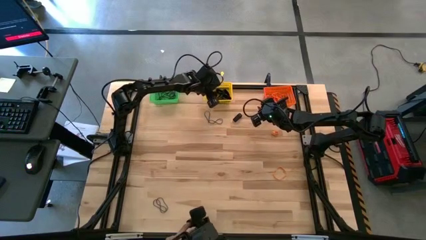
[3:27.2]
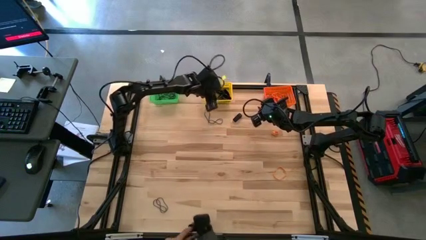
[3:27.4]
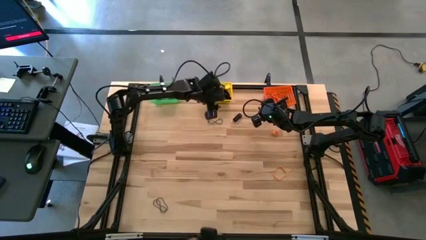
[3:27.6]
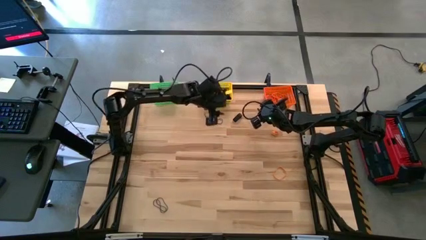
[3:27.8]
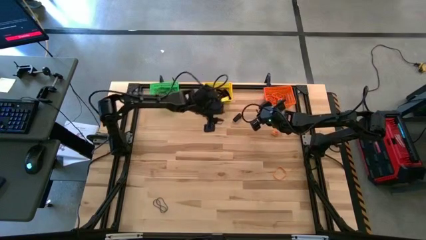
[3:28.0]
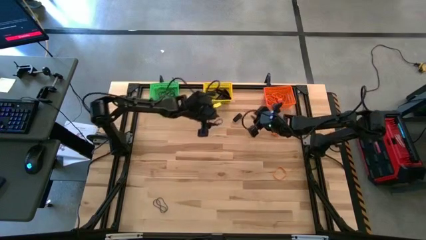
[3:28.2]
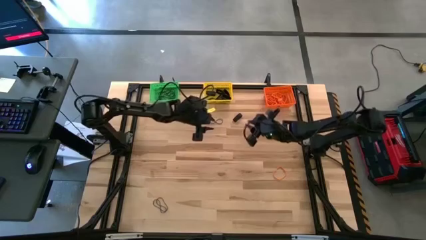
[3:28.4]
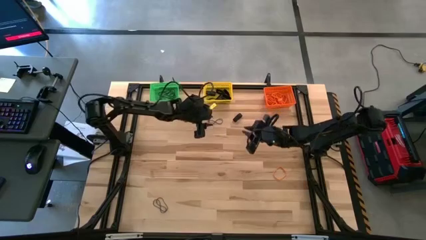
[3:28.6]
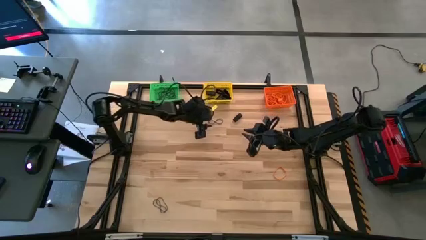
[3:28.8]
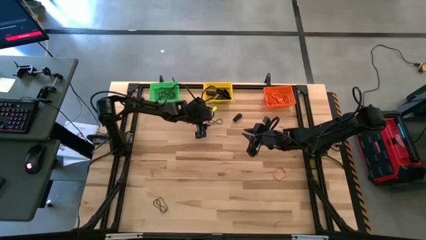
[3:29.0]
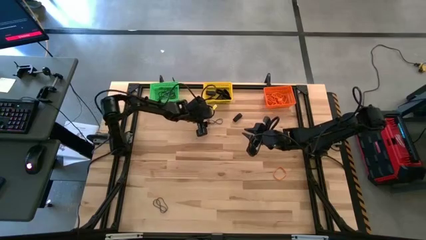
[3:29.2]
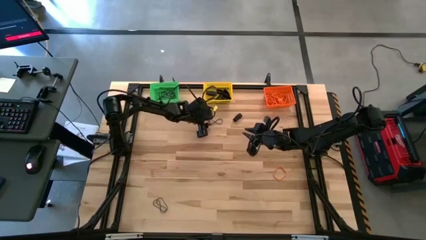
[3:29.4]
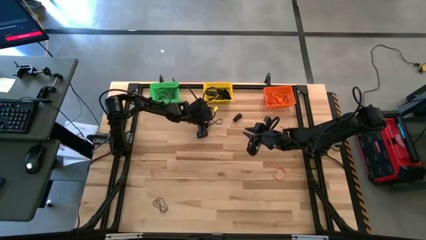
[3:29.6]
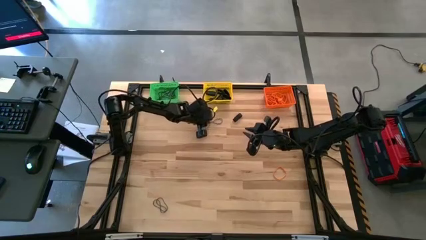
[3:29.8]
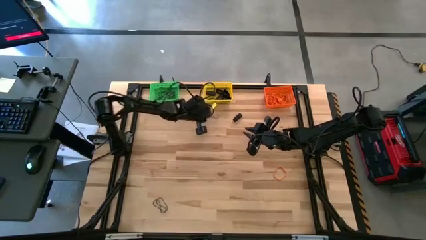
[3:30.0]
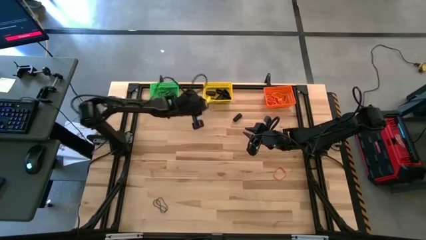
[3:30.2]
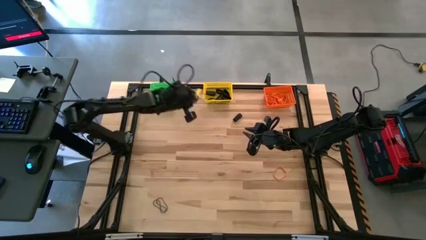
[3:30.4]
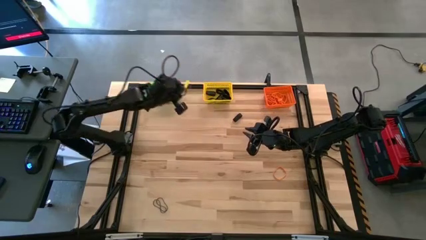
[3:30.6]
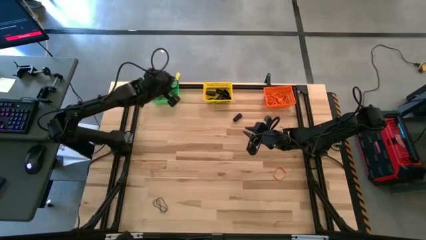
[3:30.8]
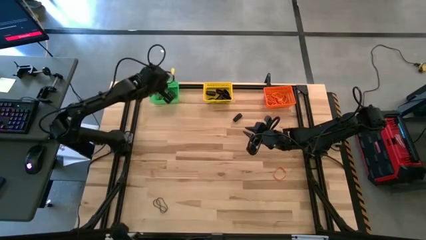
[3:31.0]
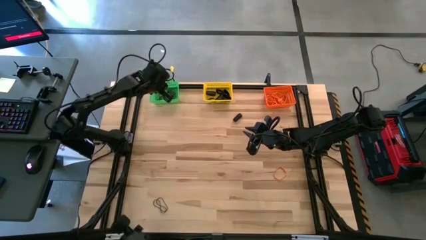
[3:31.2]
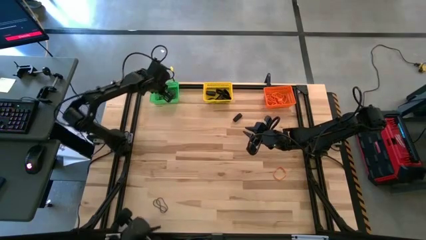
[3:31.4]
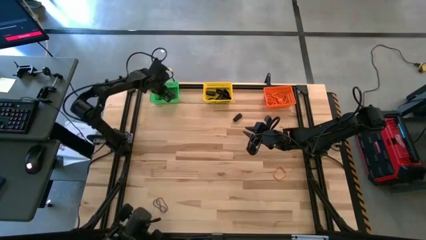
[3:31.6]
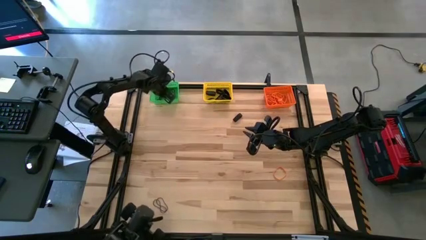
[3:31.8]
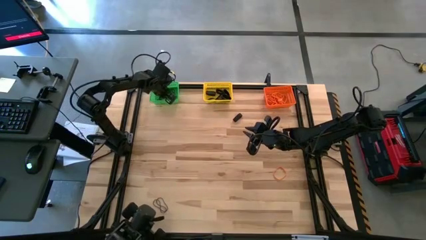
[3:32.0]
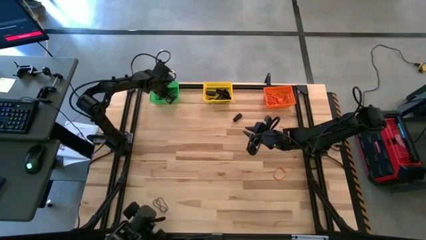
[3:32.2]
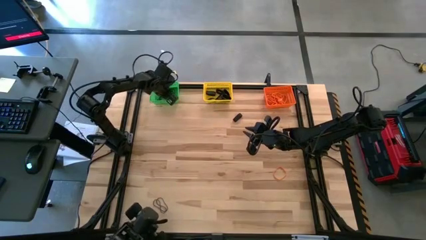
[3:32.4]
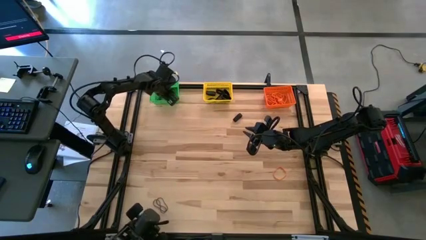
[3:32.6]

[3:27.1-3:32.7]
Task: Sort rubber bands into baskets
Put the purple rubber band into the green bin

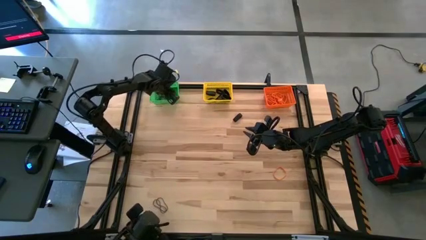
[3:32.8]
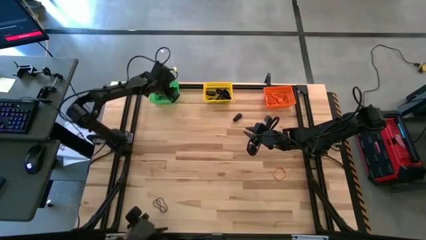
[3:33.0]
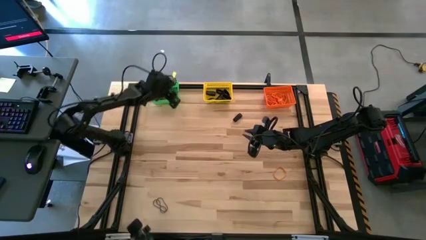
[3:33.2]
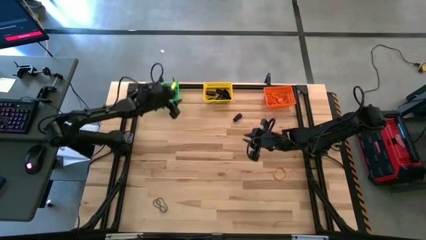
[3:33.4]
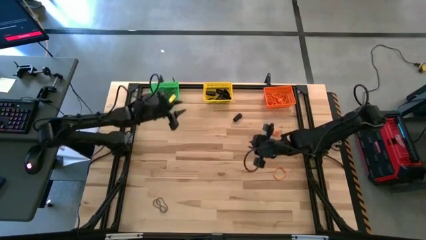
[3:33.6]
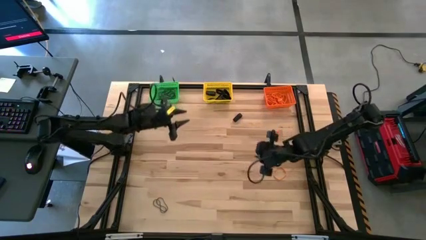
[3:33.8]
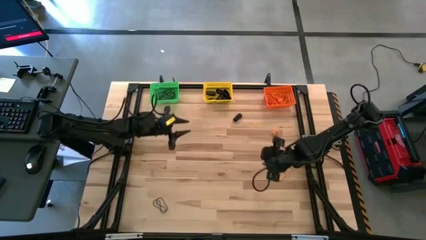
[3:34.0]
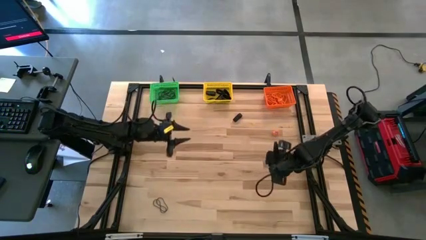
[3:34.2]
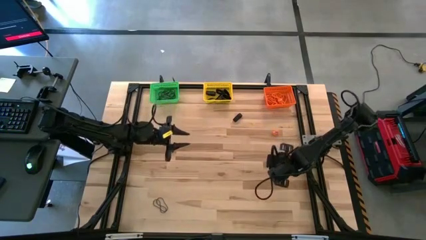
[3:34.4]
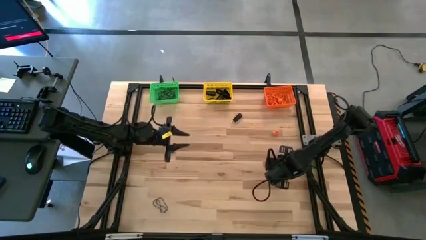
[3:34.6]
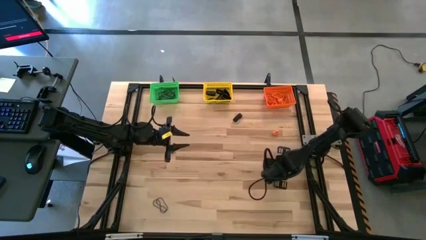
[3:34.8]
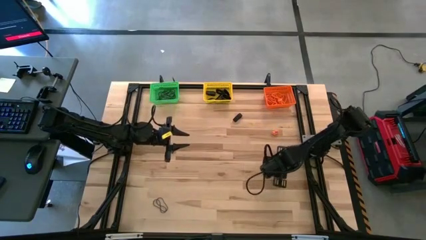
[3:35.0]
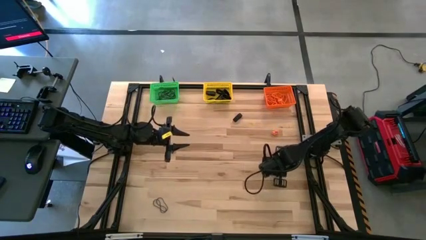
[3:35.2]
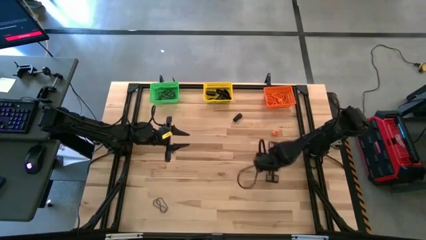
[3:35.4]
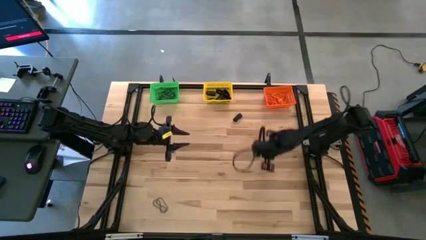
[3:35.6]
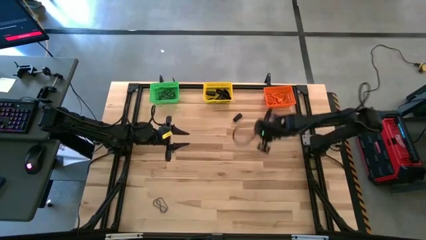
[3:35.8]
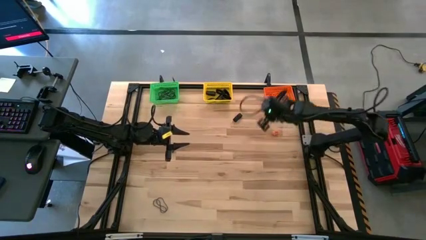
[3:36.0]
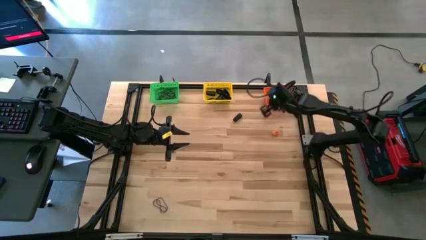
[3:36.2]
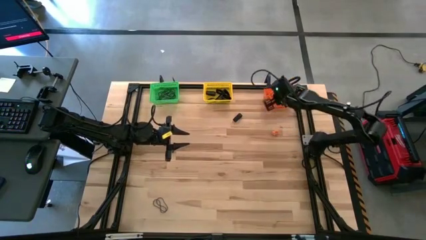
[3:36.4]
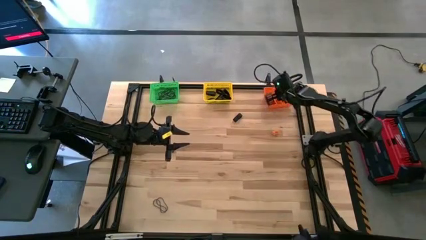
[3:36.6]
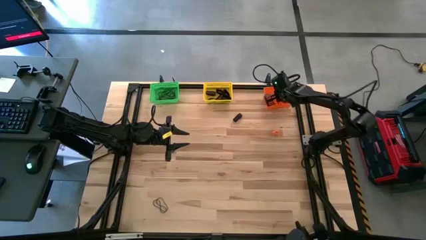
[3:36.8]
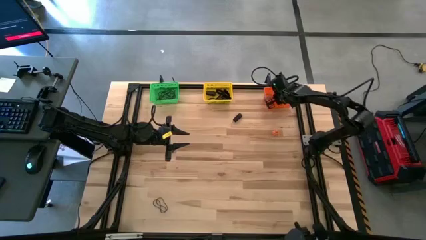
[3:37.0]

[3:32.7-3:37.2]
Put the orange rubber band into the orange bin

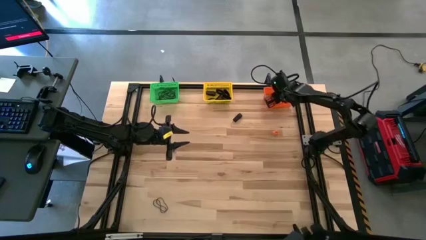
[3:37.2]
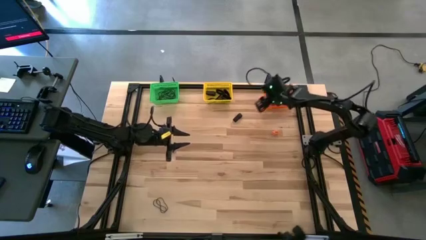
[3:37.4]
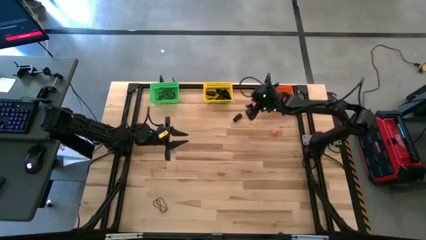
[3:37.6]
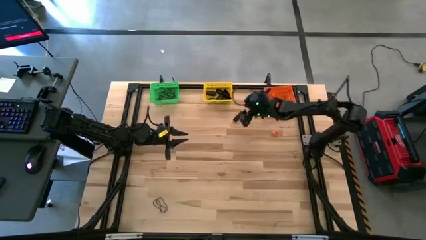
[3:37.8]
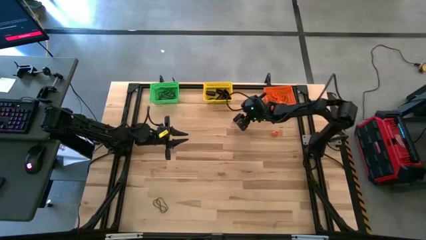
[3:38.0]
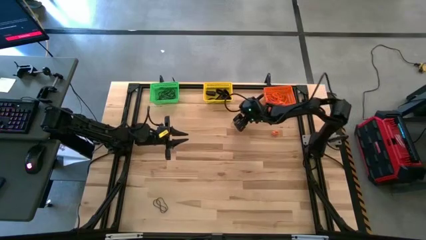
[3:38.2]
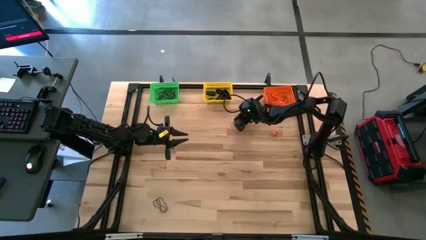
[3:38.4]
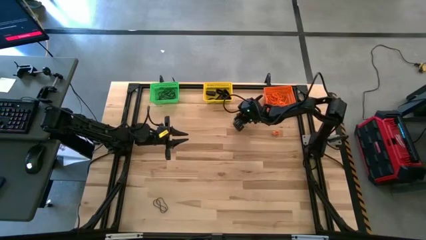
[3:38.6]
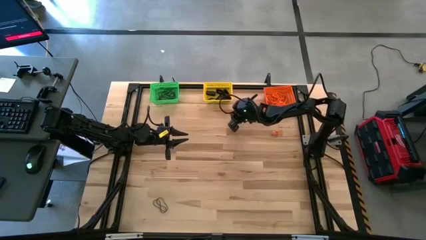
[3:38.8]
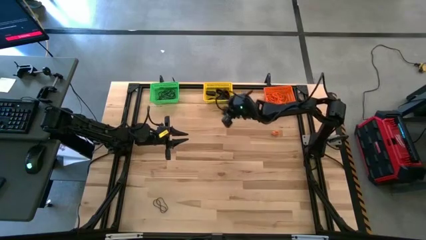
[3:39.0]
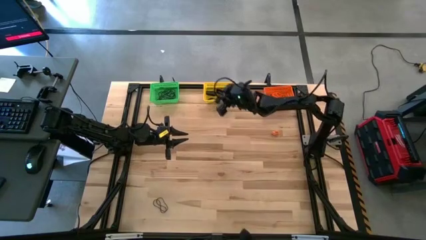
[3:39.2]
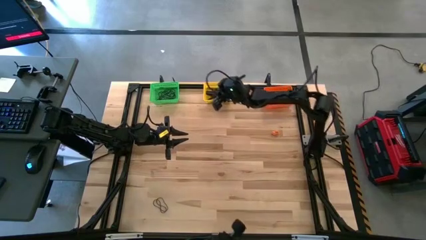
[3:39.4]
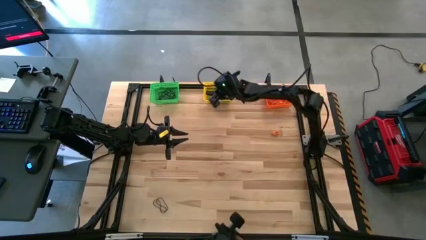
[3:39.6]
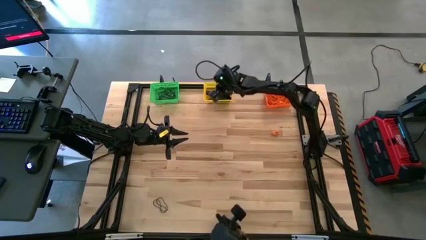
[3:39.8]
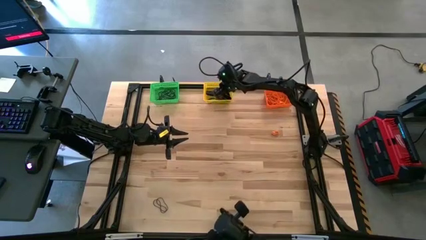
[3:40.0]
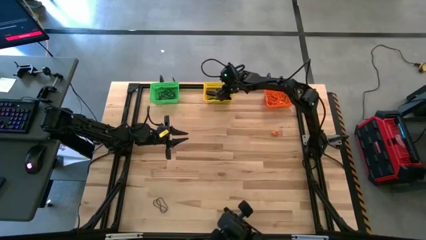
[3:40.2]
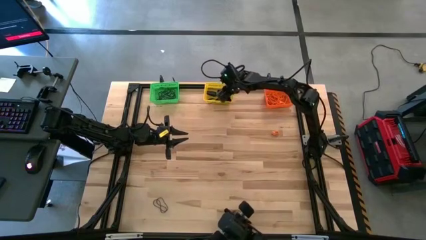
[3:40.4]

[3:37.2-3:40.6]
Put the black rubber band into the yellow bin

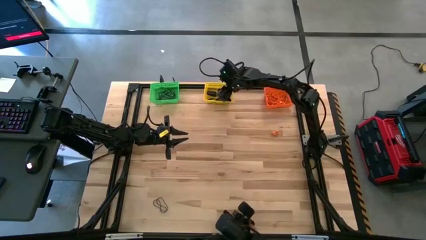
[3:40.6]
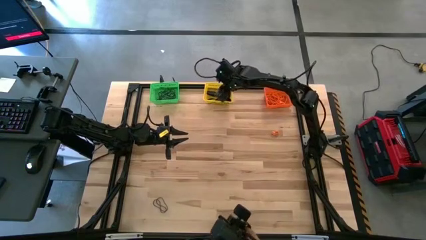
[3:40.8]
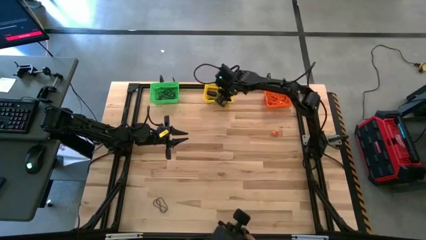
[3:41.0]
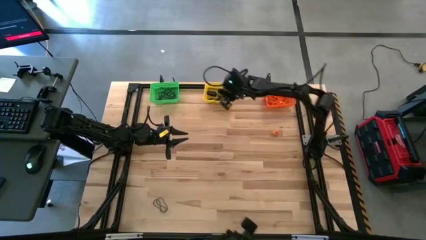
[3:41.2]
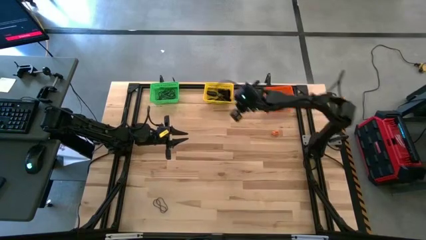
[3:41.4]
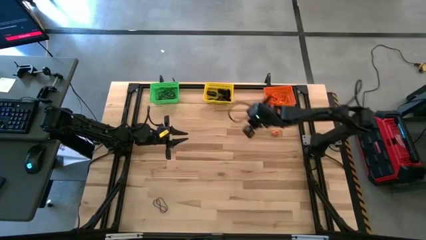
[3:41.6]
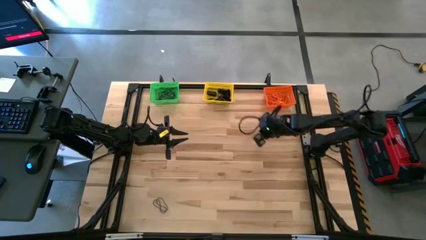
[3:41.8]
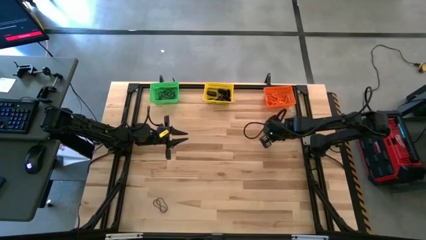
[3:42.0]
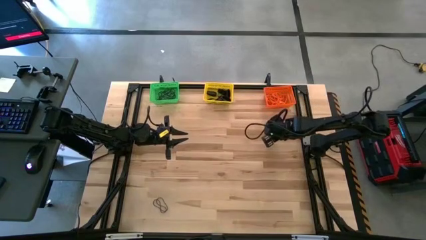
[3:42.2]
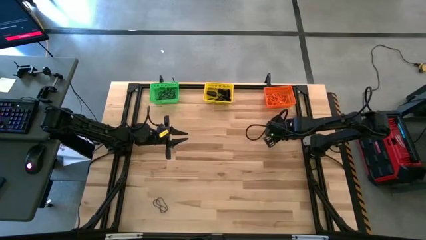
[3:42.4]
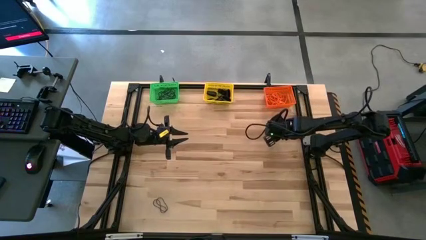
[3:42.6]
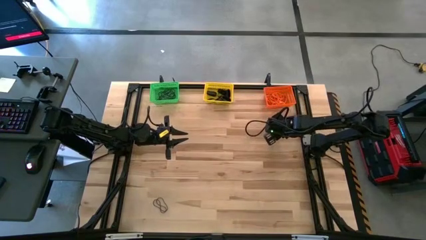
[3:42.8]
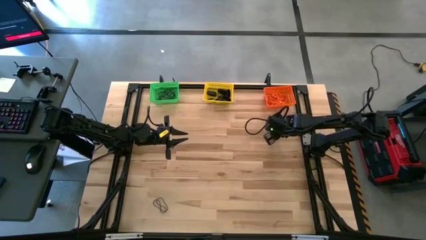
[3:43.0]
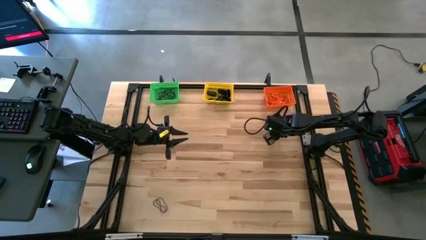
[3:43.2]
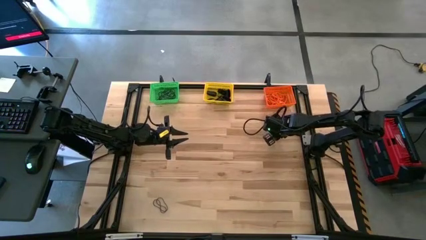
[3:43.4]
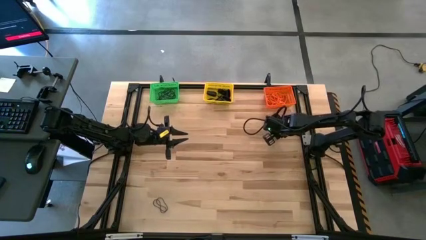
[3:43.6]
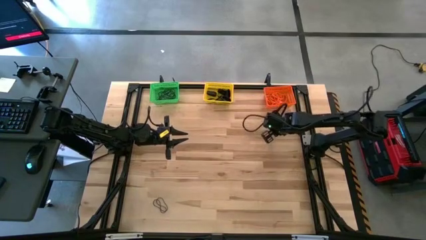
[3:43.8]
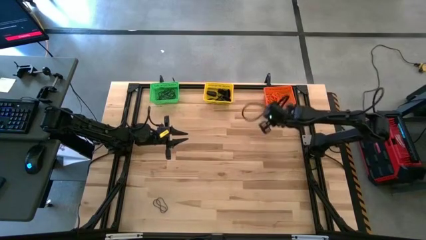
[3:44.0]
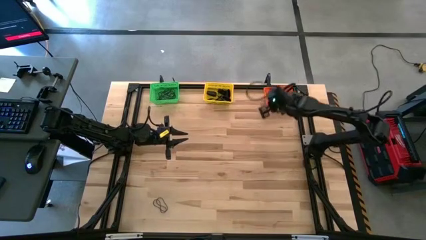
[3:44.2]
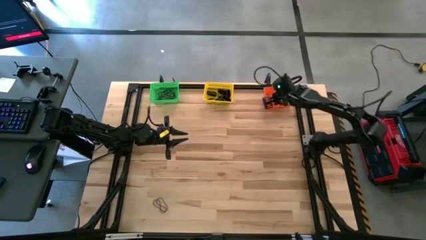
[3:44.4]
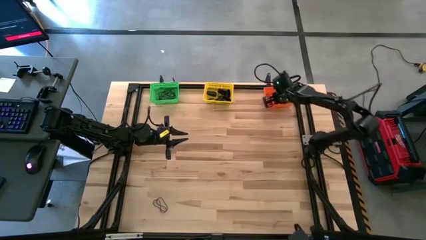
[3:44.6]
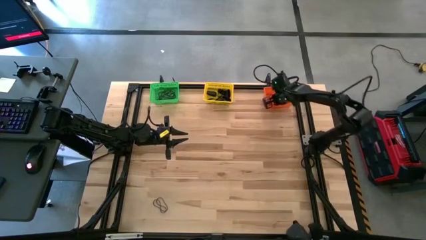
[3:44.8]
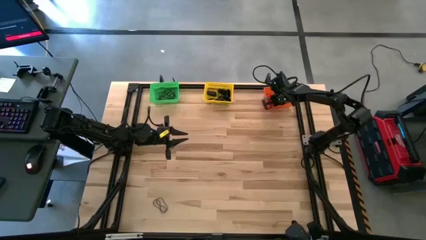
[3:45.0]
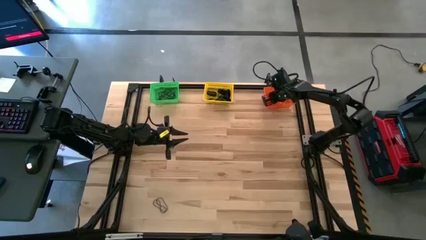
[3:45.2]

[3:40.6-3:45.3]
Put the orange rubber band into the orange bin
